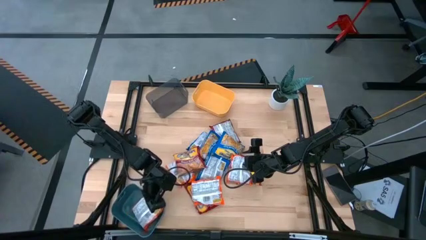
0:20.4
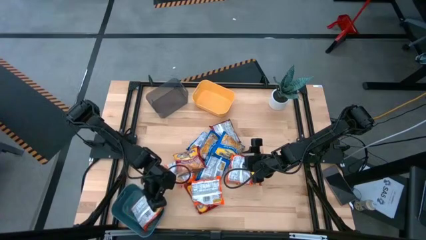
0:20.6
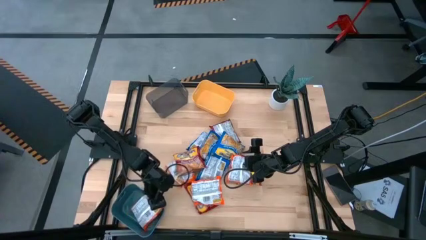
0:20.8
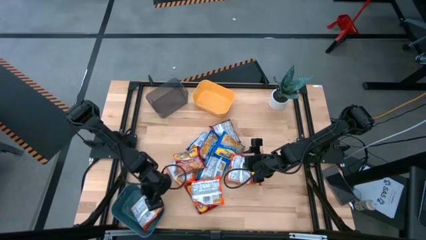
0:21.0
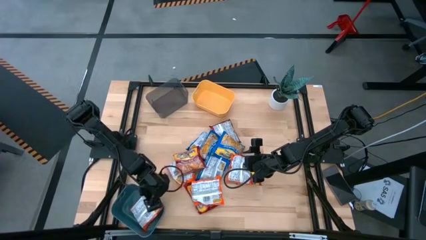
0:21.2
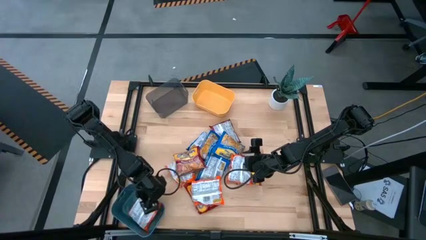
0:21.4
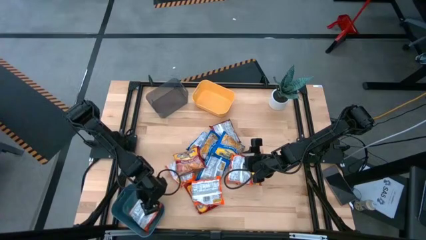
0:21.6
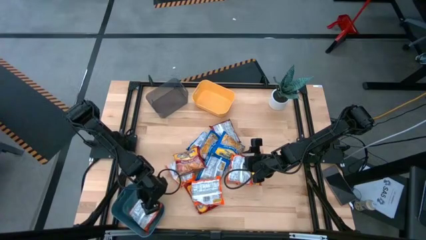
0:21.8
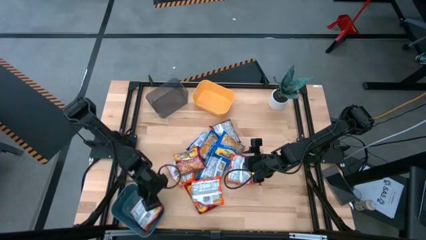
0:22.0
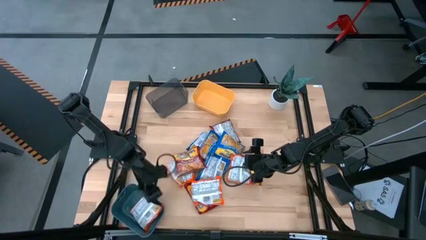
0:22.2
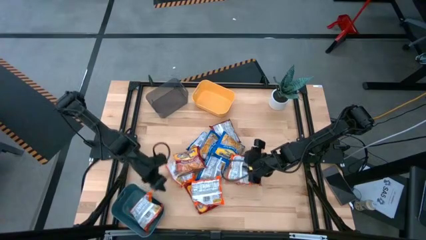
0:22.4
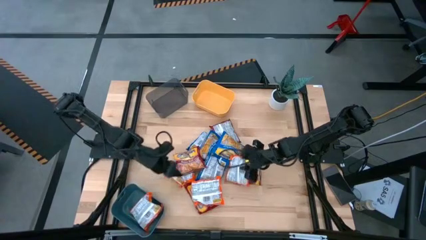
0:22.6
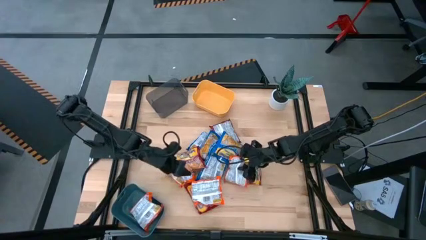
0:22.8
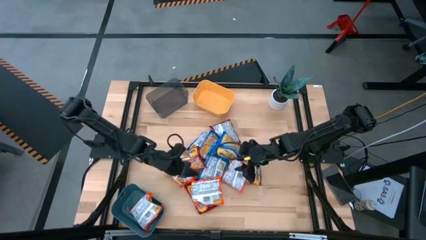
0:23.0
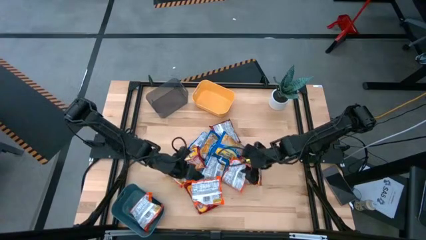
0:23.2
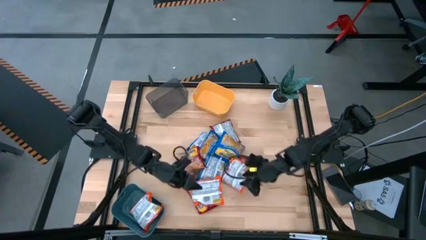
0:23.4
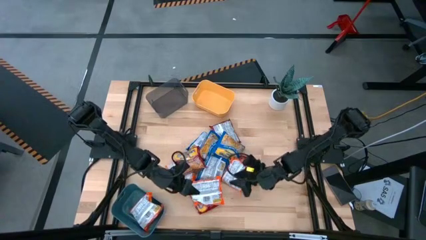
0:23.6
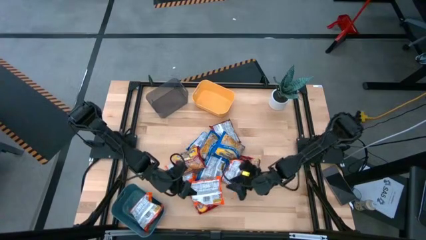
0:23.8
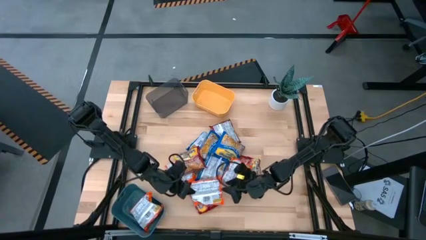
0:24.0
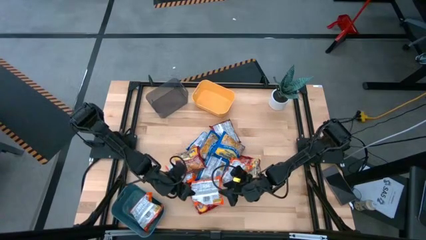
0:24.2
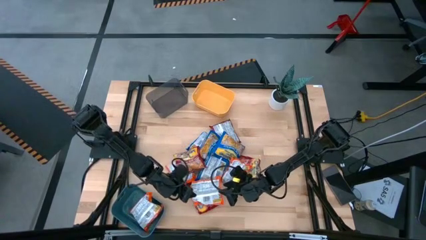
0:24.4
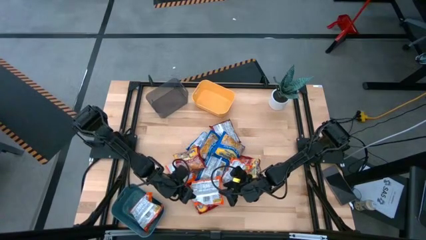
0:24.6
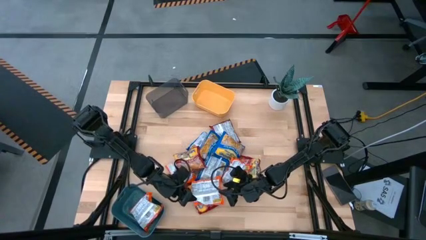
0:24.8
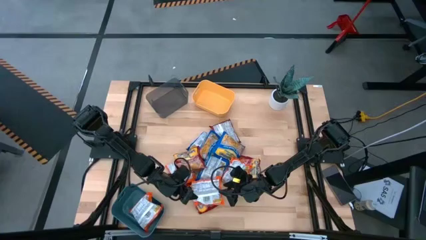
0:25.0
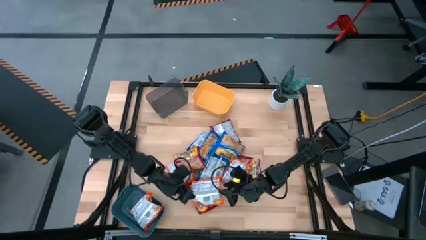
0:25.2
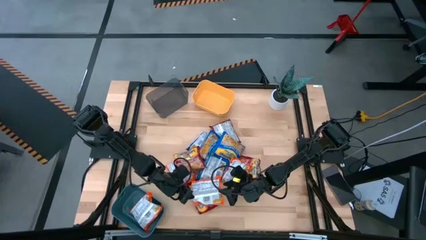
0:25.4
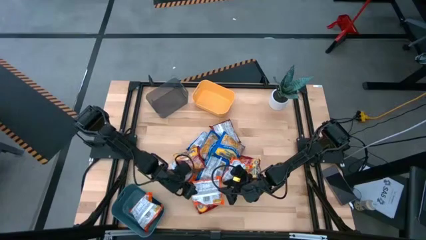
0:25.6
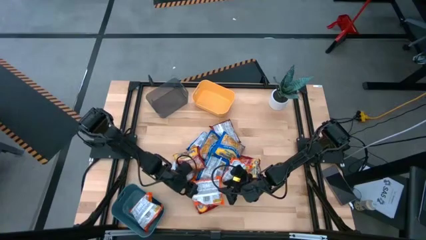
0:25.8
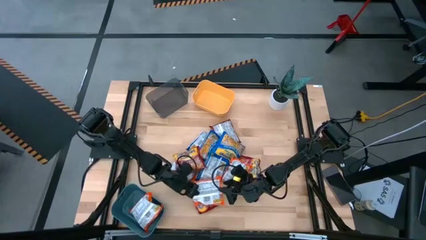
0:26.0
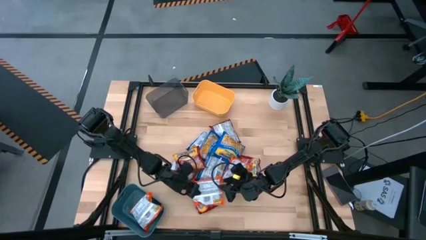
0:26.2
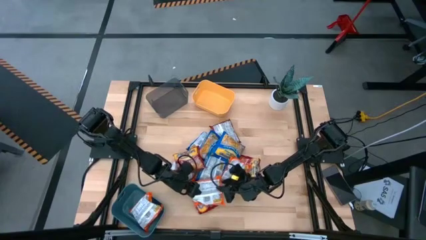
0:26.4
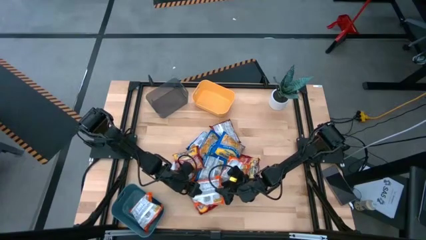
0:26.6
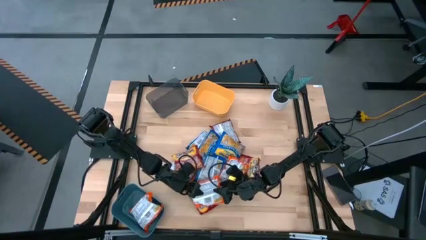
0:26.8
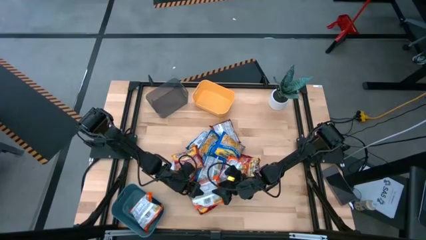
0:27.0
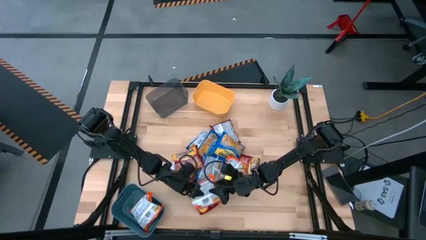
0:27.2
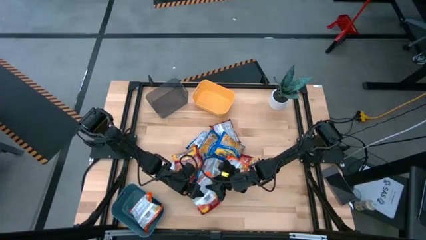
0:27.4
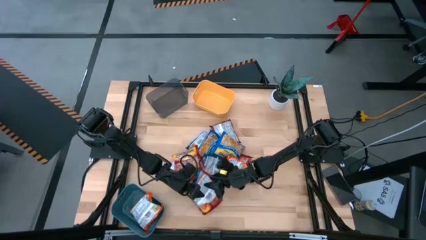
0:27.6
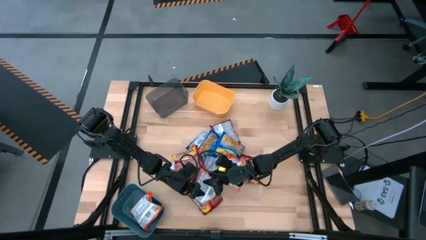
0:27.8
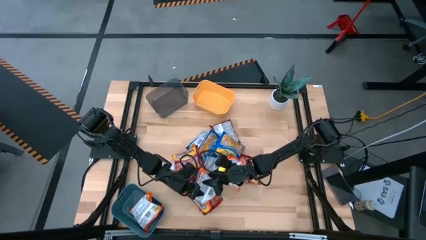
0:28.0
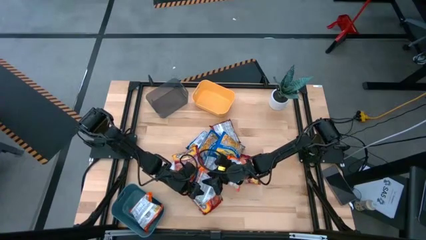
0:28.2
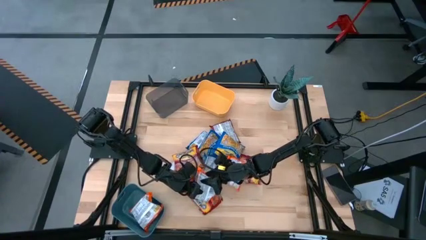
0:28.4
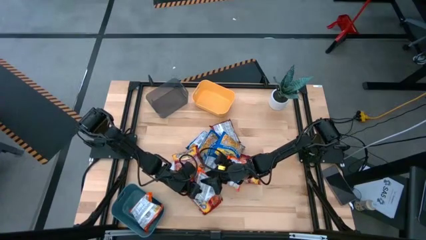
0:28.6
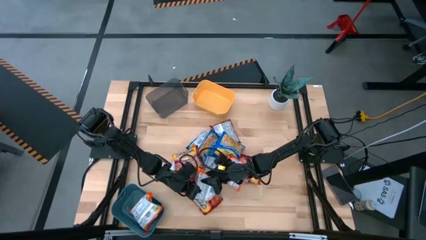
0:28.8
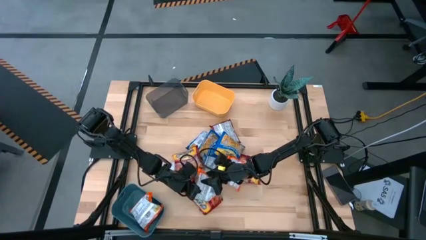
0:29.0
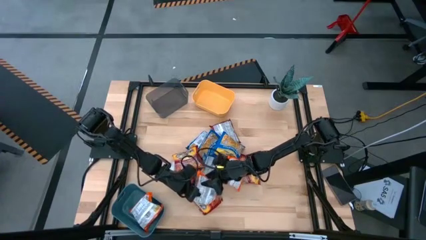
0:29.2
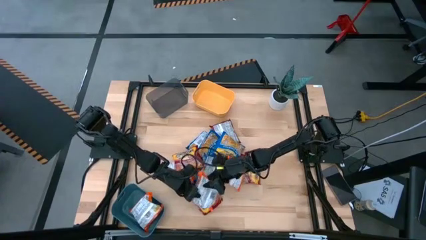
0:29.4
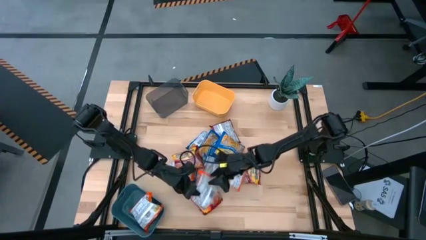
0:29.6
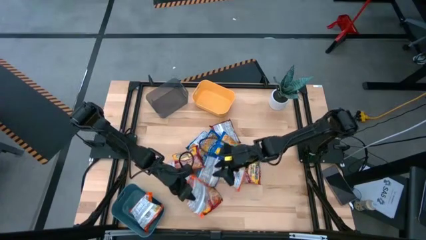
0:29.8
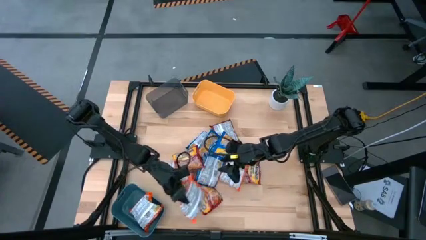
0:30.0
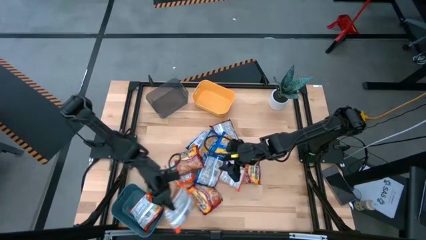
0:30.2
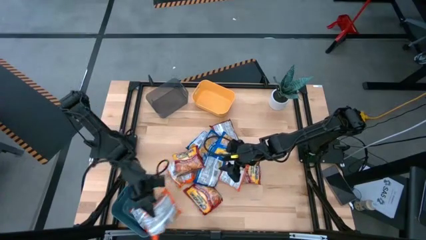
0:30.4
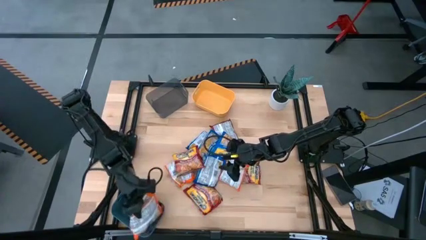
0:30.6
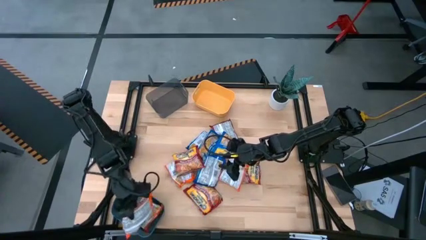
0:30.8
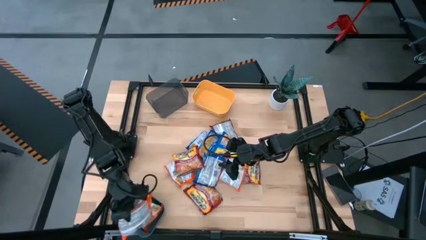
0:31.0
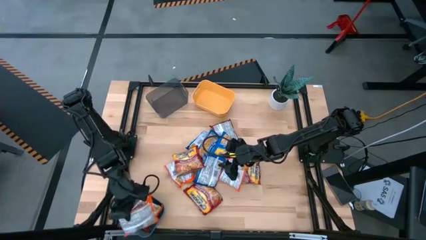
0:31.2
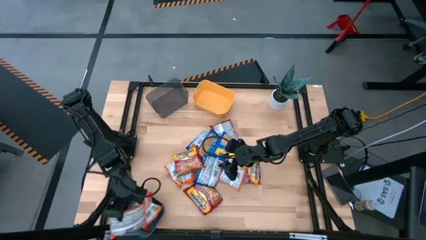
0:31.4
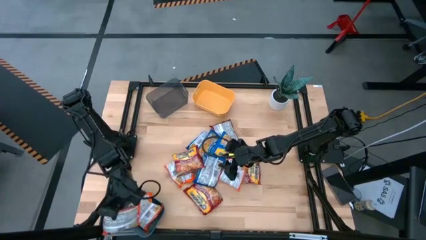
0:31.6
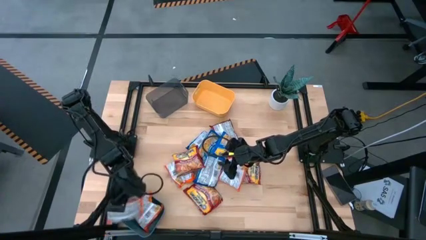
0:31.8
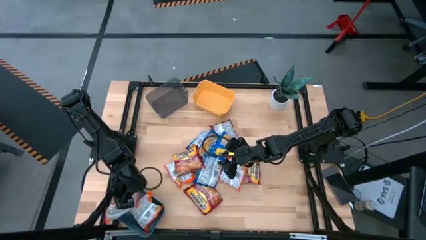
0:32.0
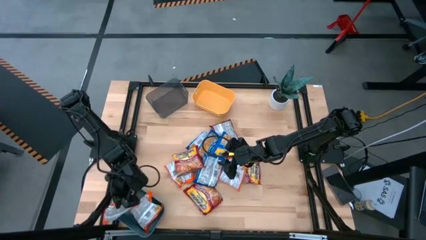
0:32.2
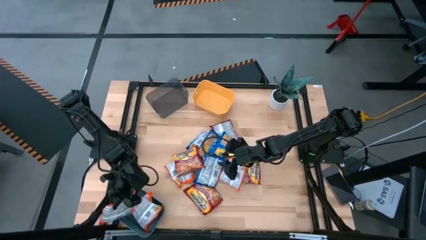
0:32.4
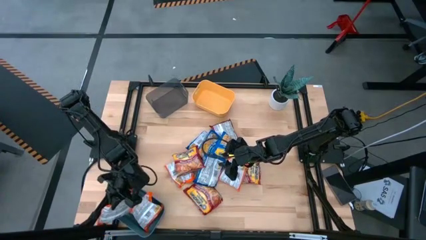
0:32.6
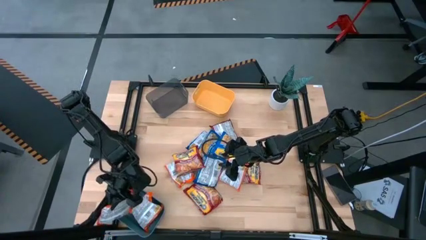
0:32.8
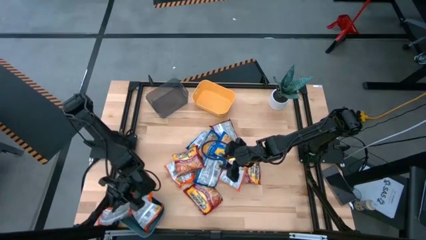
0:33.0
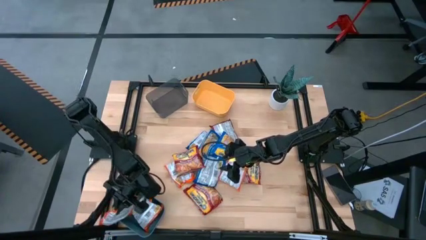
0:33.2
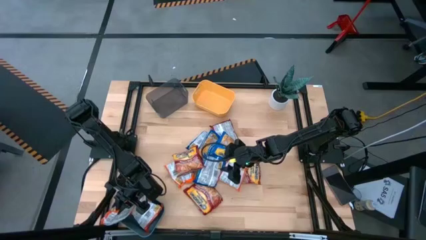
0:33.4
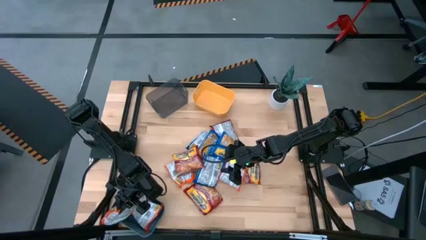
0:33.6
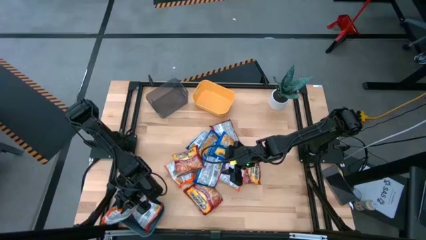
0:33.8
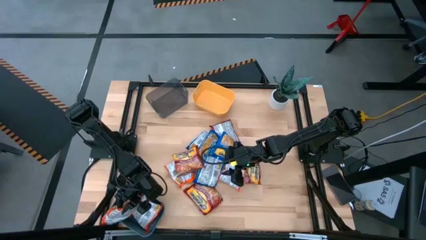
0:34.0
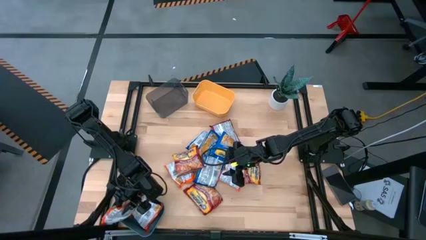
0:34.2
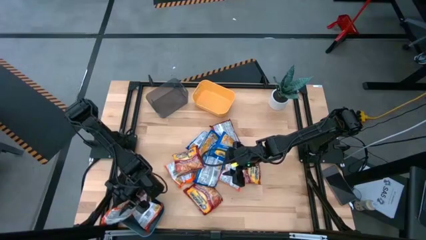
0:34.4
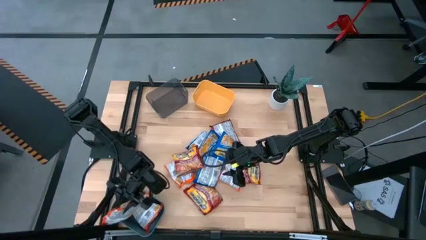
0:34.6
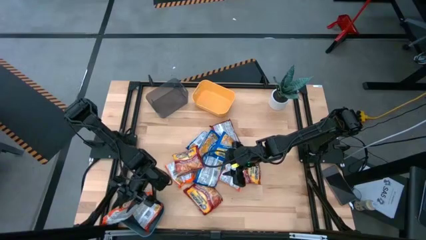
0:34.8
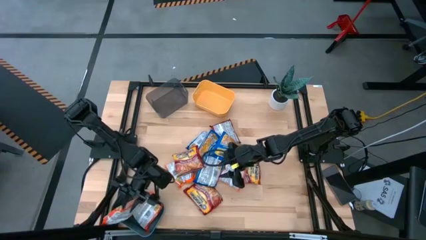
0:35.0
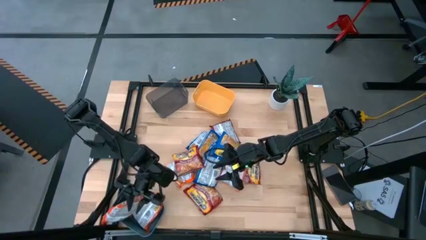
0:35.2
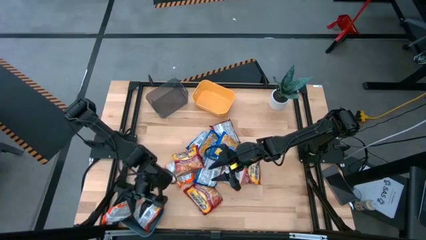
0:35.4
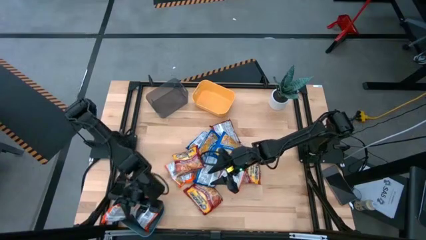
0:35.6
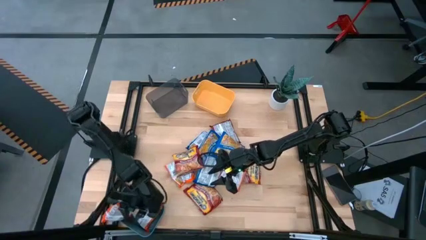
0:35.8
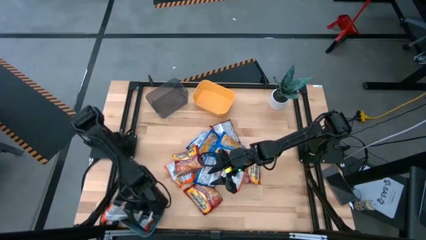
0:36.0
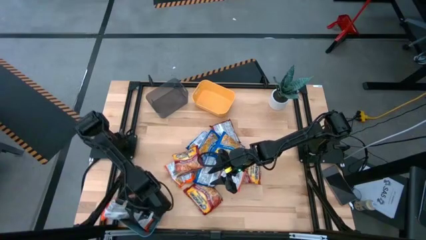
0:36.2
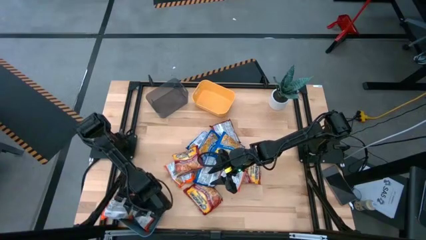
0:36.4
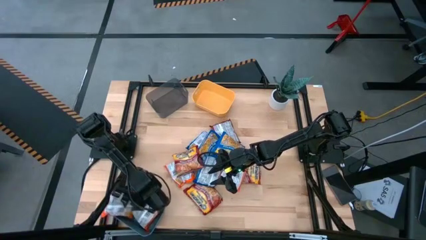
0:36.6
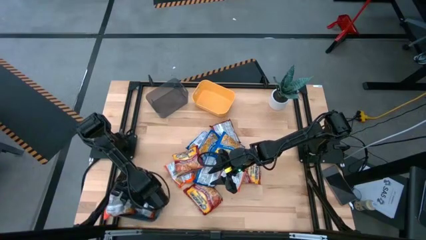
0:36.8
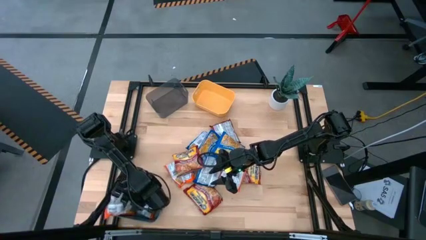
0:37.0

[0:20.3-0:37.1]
Task: Sort Maruchan noodles
Put the orange noodle pack into the blue bin
